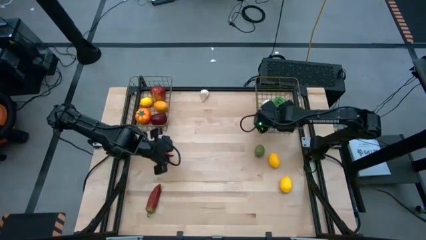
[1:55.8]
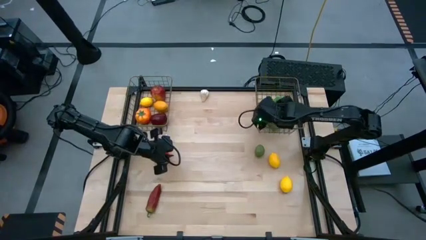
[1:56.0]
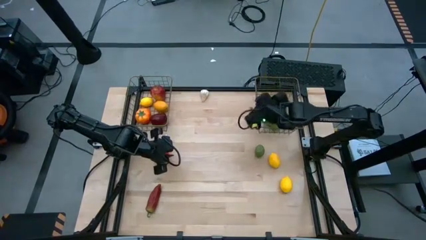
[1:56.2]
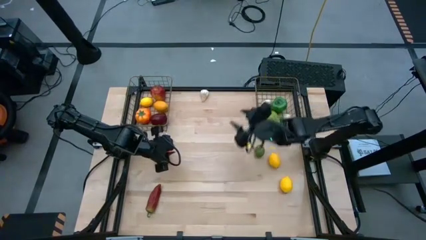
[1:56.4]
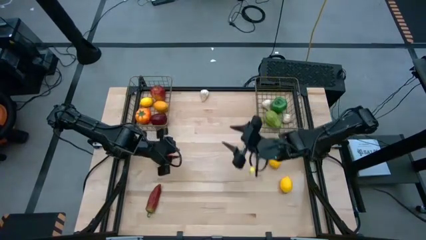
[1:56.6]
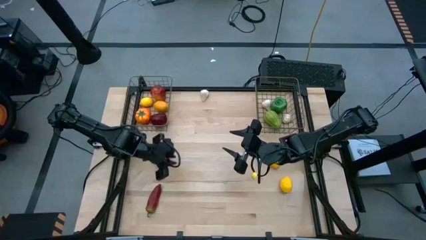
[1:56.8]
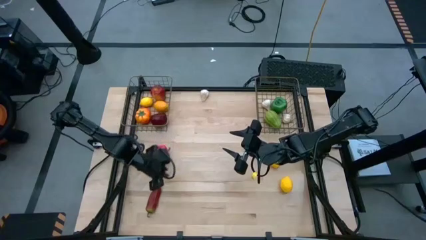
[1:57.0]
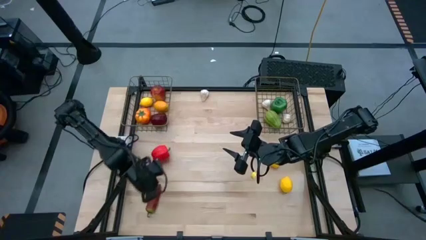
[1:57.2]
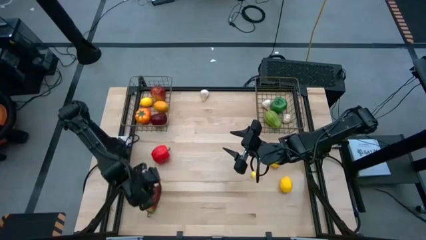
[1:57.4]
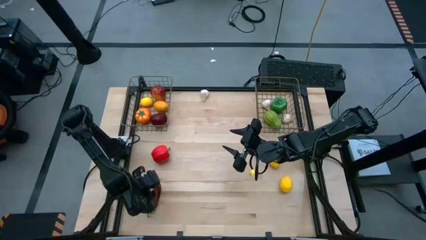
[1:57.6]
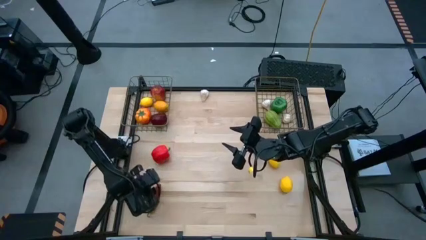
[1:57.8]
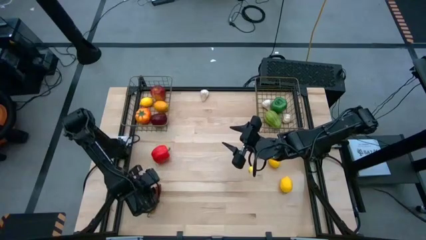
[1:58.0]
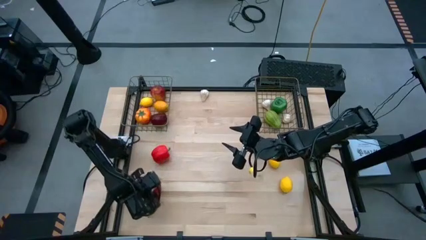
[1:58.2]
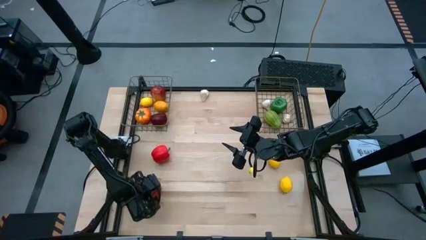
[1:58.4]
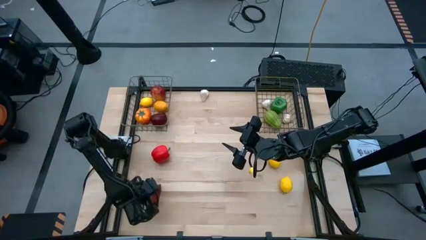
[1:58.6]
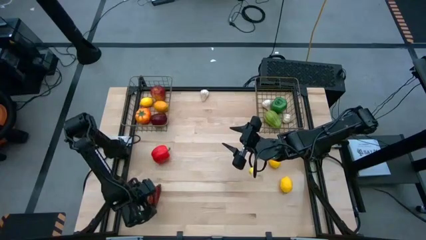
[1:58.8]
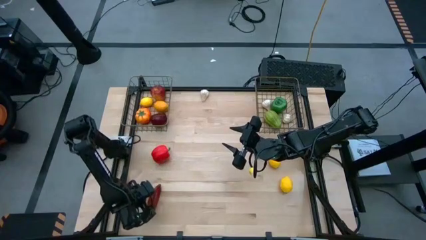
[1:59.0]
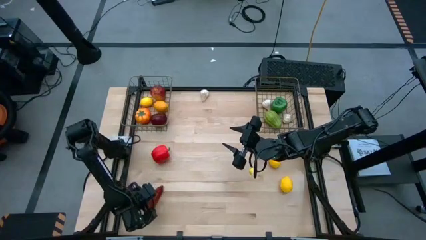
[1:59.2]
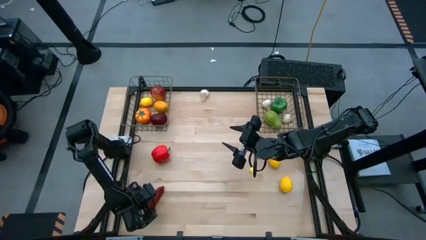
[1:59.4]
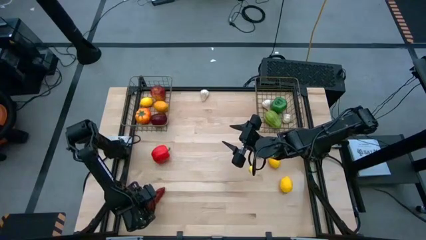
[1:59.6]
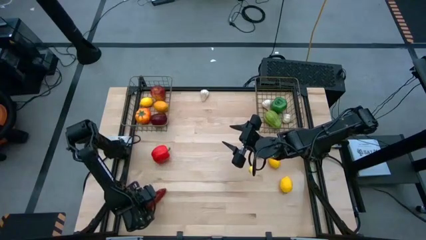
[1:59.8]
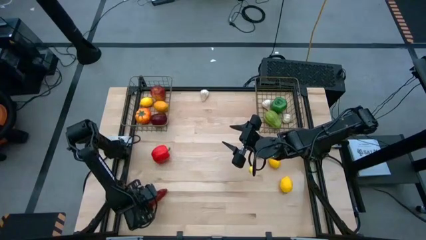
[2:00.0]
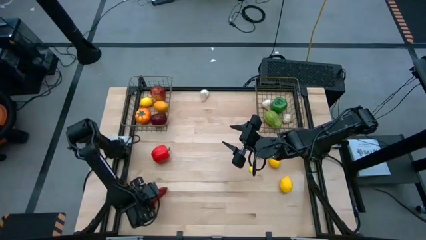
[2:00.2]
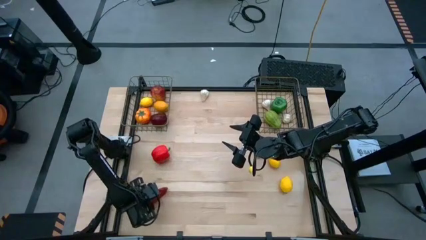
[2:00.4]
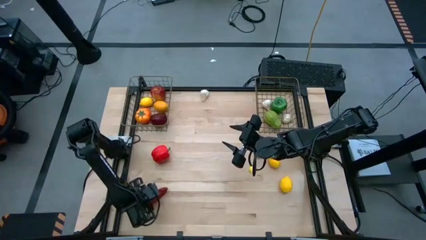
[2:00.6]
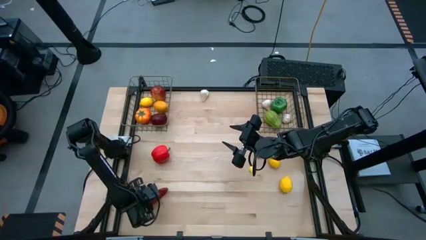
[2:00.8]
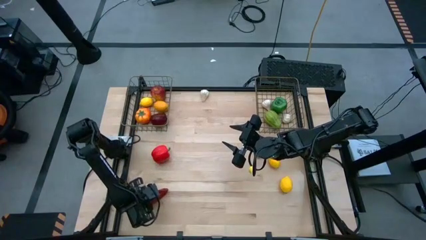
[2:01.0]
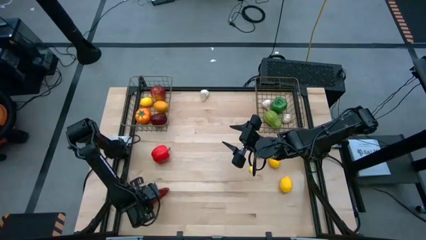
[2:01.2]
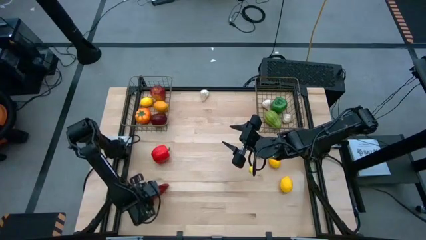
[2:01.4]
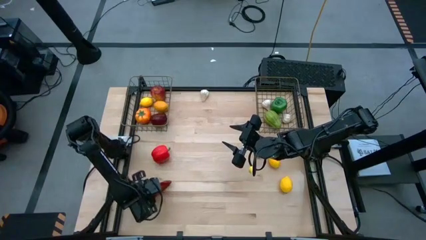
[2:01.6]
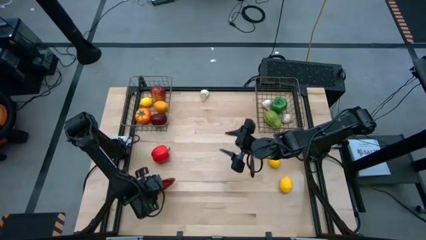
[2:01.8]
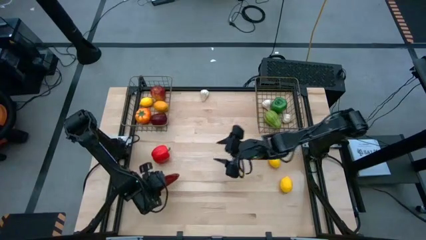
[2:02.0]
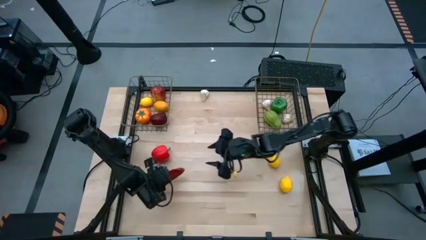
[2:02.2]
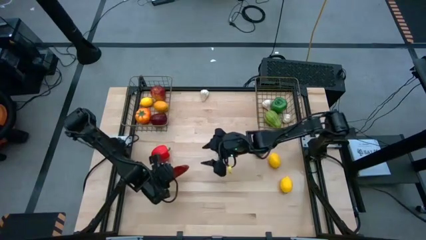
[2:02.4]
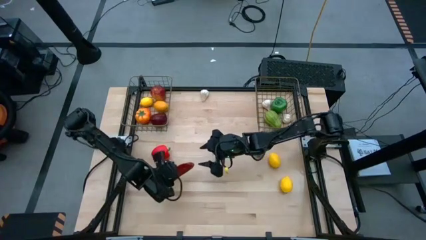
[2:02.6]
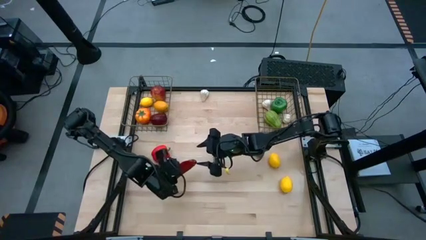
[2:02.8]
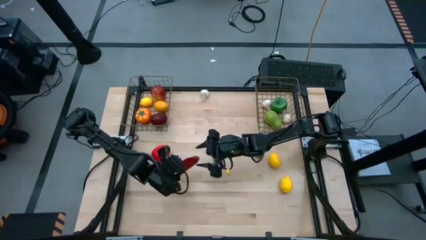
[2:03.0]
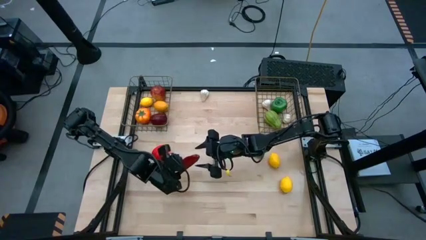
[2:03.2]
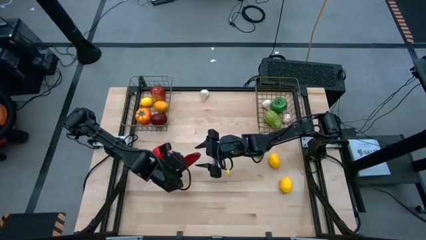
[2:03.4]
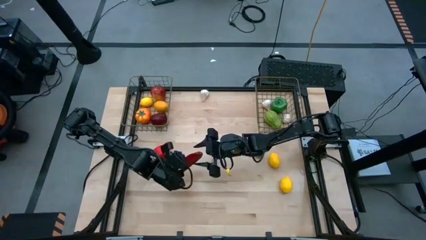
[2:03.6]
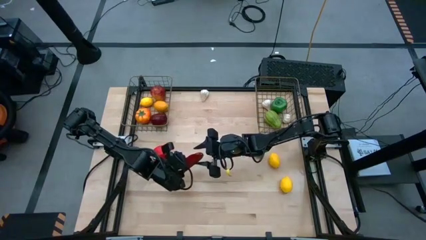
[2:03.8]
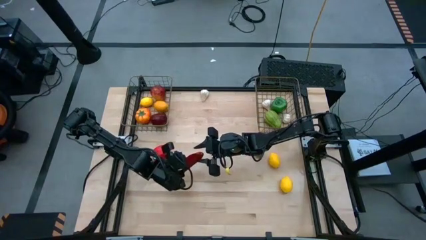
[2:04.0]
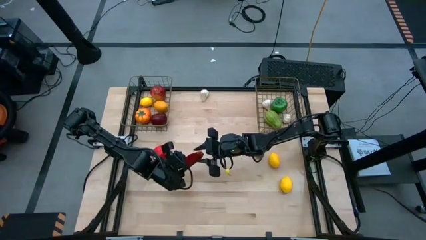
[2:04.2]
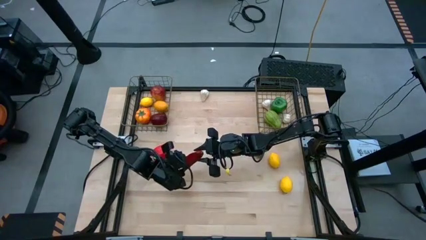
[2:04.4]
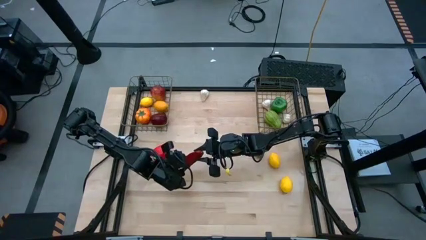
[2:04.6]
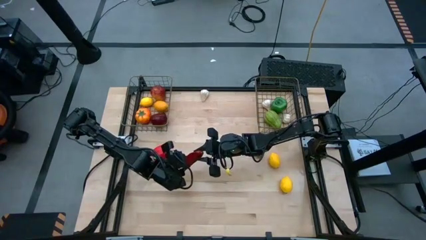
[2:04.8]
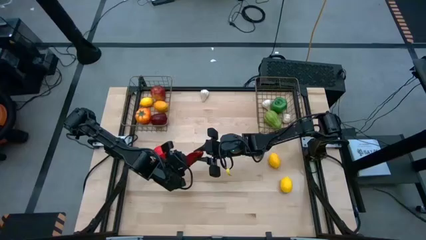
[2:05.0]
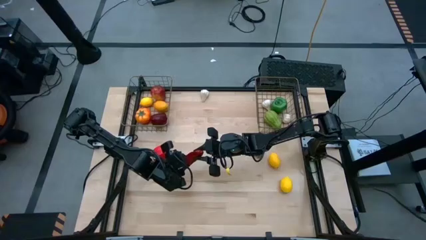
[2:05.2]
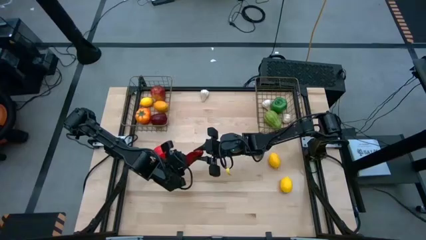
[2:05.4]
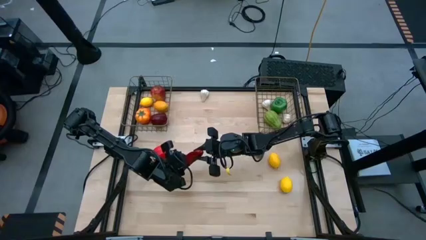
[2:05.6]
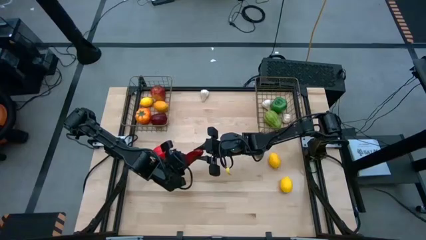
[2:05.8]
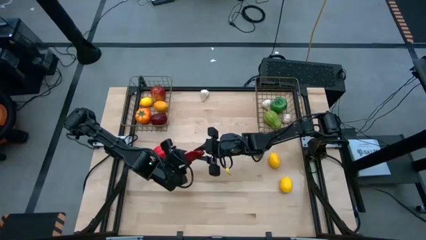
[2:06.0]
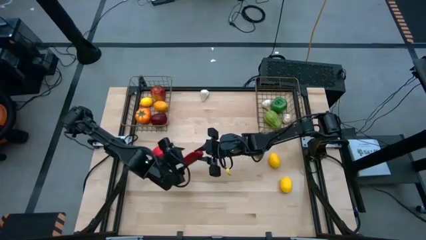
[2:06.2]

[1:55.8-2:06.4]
Task: Sort produce into baskets
Put the red chili pepper into the right wire basket

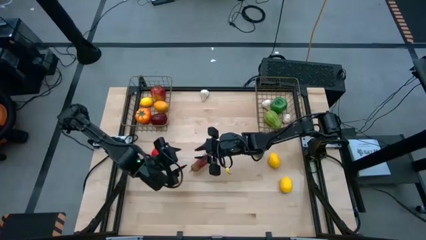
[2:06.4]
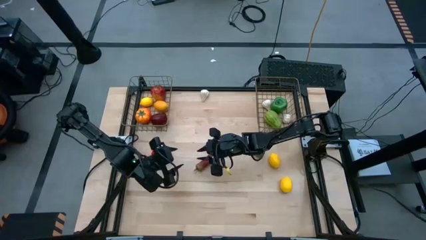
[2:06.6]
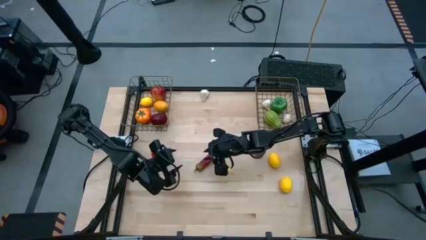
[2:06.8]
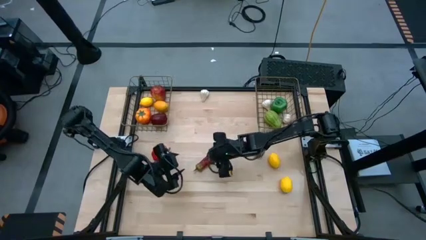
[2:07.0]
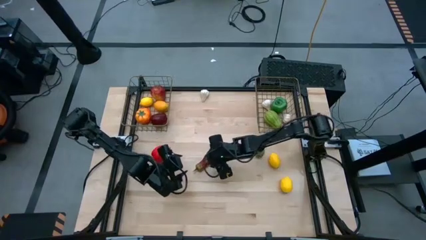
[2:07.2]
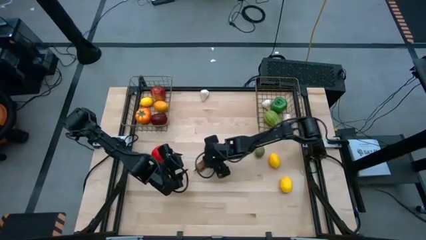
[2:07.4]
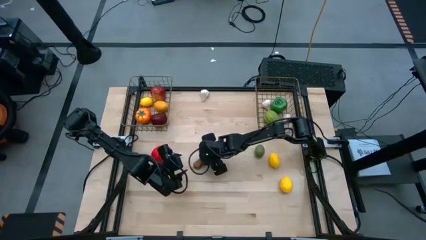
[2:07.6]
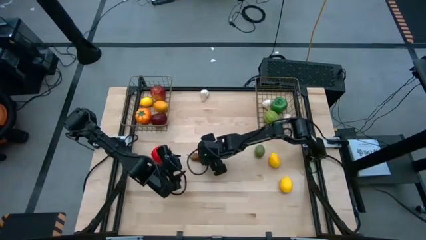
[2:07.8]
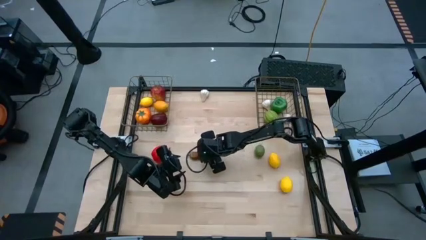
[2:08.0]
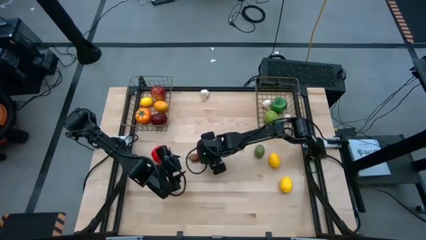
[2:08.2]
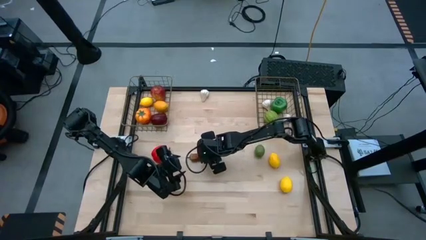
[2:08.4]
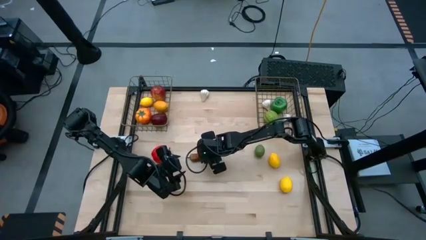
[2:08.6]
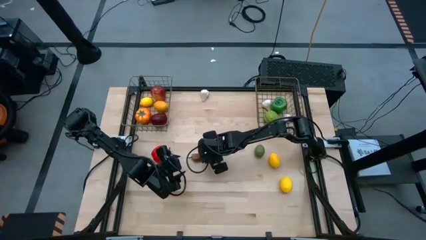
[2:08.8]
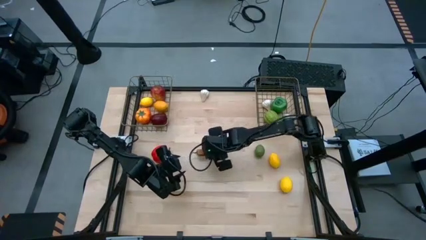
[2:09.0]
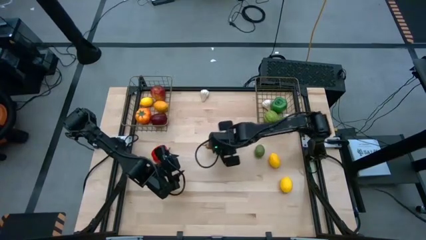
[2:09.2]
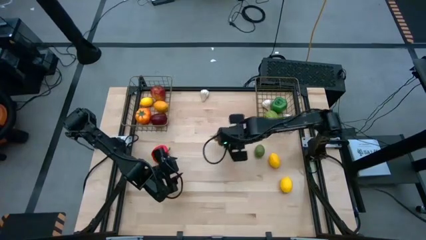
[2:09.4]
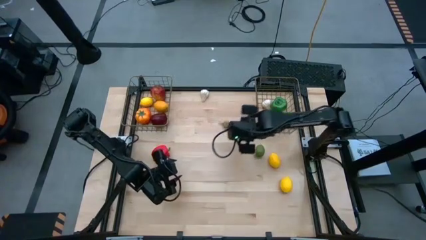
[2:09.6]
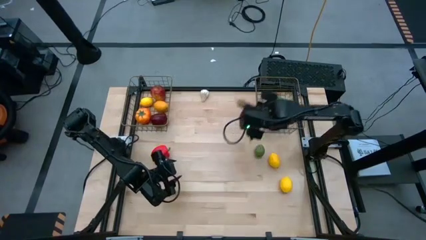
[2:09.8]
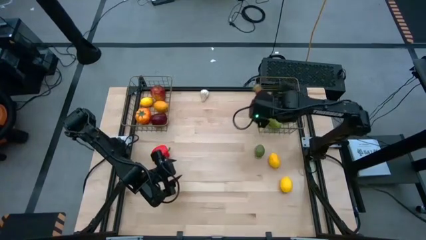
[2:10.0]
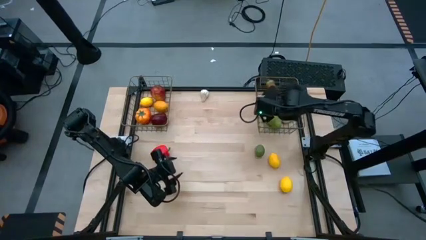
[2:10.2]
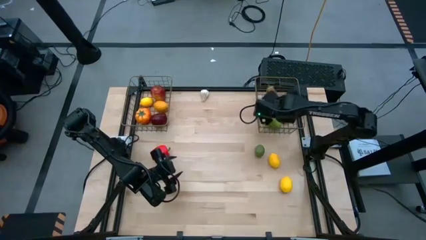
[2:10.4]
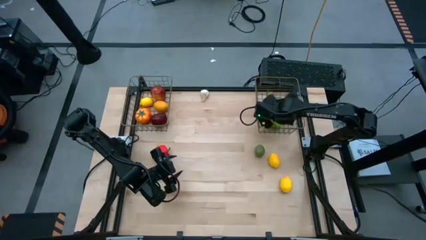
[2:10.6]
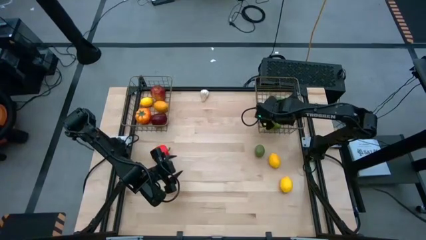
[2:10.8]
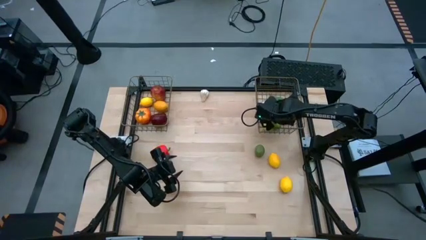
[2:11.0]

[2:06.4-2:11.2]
Put the red chili pepper into the right wire basket
